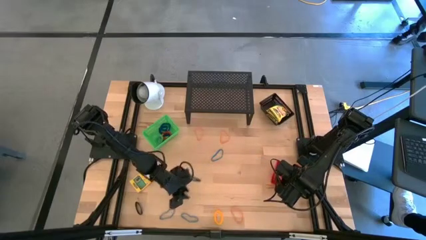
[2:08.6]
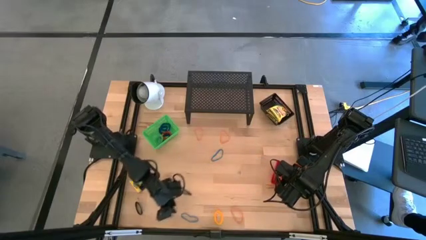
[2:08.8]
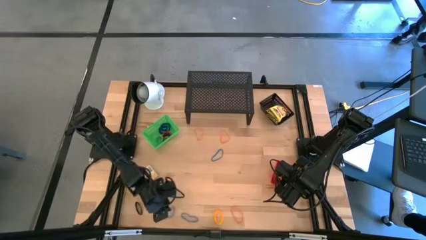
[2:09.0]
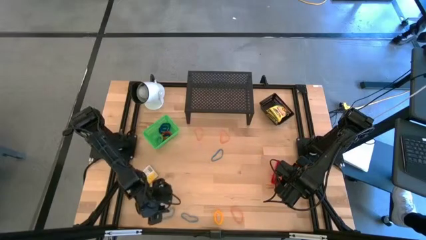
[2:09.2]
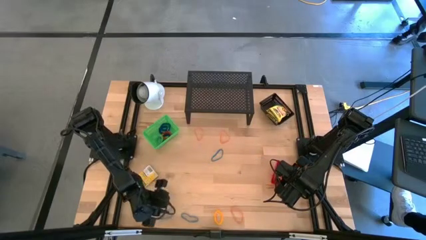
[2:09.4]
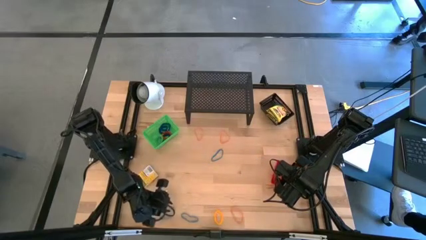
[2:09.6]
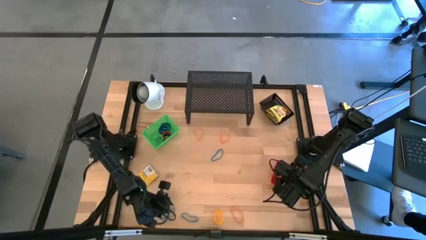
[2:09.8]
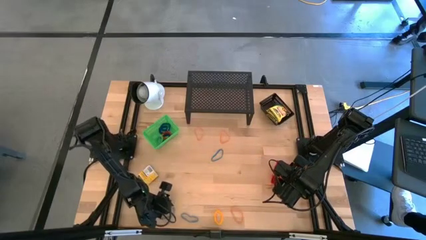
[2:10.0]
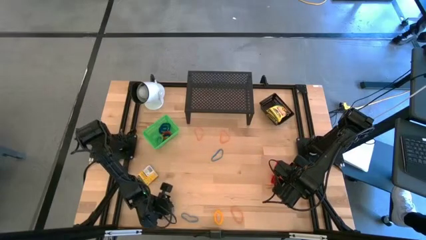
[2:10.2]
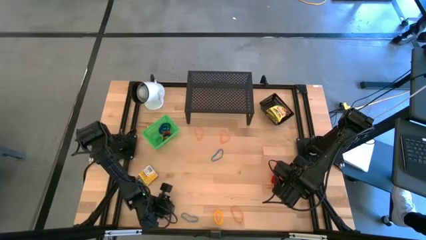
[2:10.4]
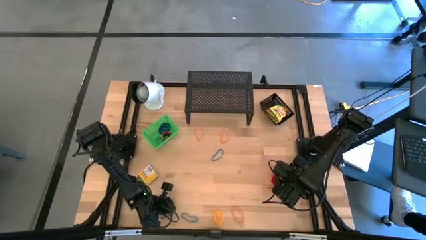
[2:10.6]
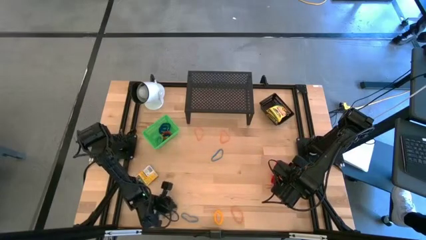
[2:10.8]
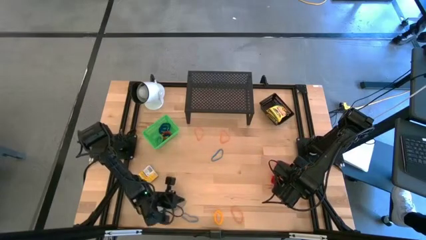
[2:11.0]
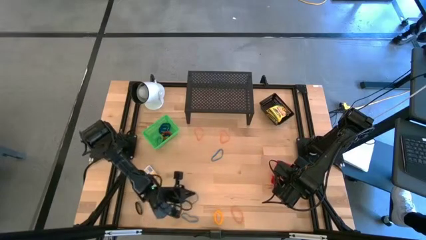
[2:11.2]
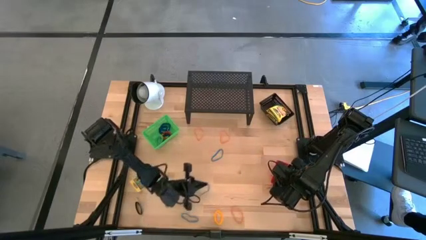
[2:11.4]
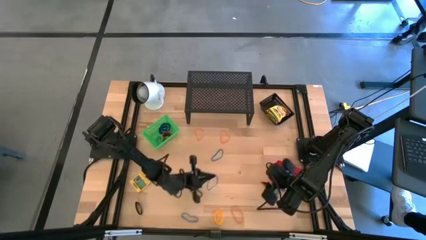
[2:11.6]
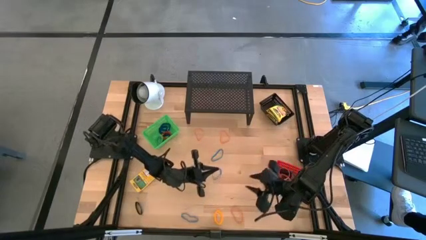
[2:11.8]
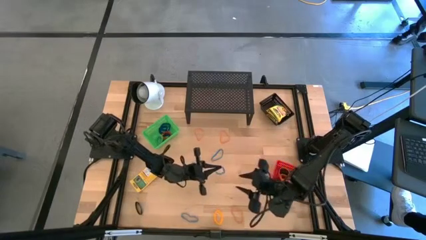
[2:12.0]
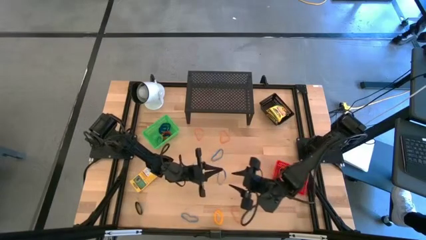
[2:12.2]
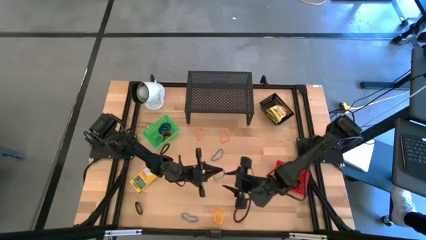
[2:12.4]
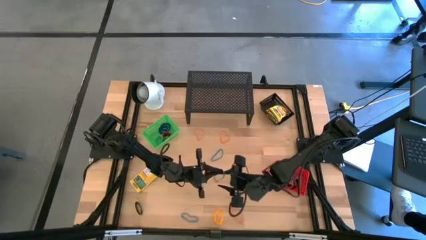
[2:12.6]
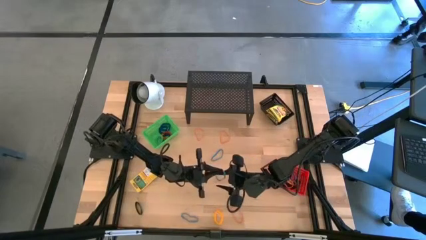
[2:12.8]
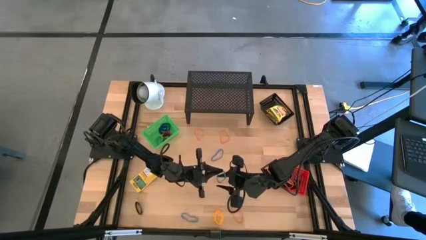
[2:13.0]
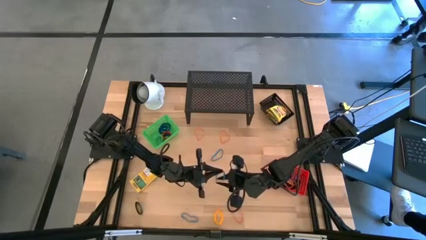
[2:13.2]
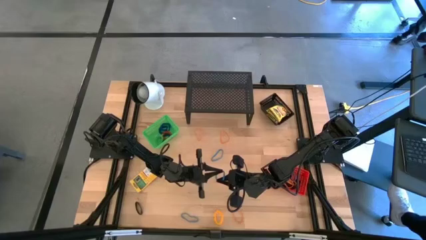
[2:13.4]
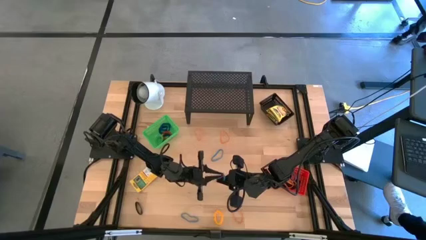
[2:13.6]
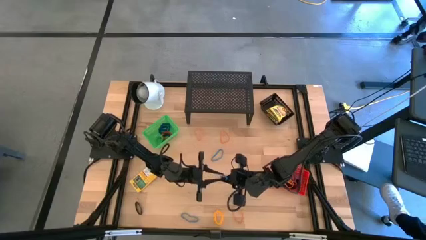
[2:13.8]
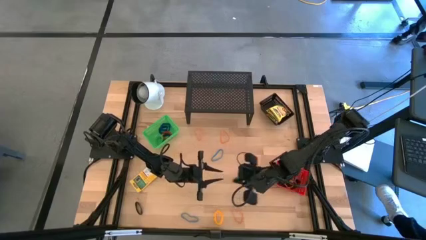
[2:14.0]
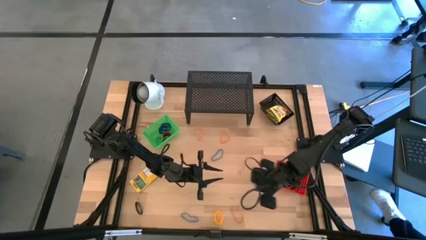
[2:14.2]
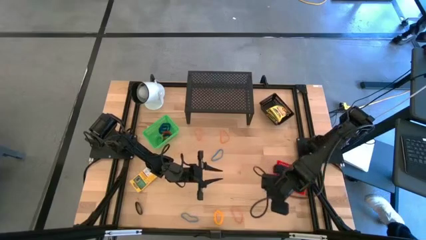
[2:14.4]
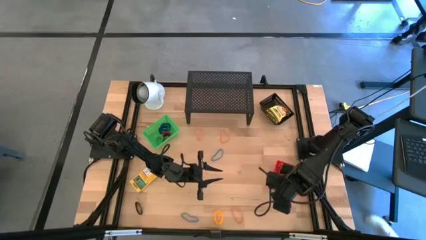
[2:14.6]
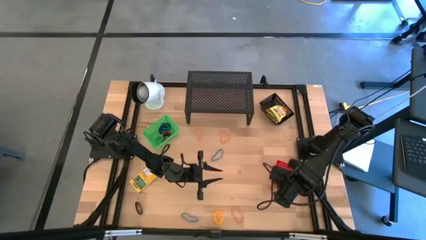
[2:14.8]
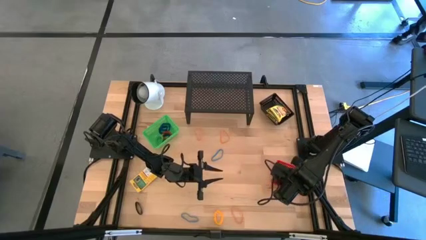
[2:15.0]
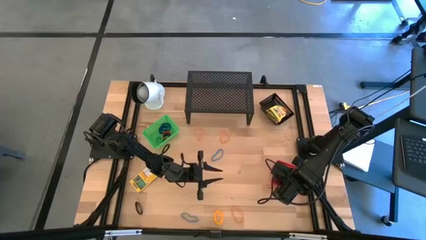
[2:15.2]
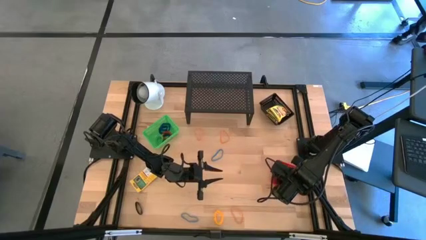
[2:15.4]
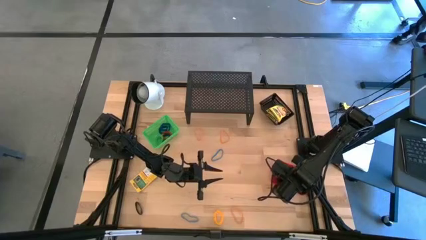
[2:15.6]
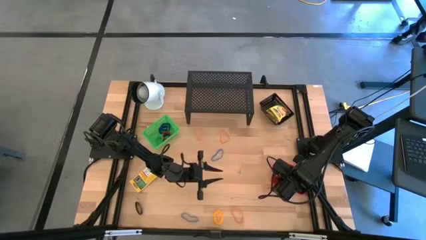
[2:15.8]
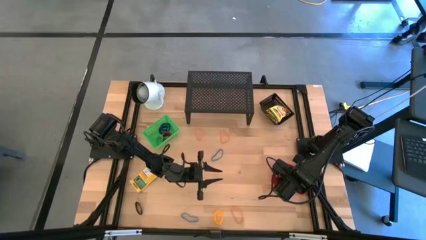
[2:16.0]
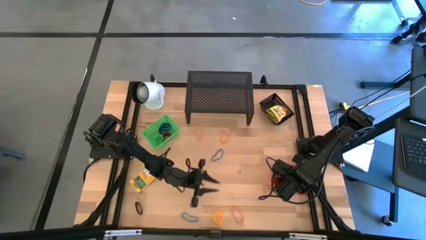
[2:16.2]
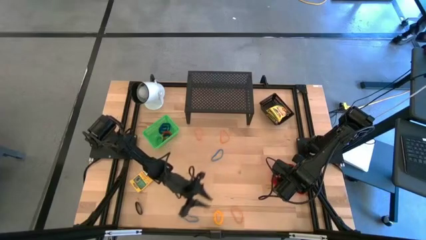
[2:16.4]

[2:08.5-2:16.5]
Task: Pick & Place Office Desk Supplies
Put the bottom left blue rubber band into the red bin

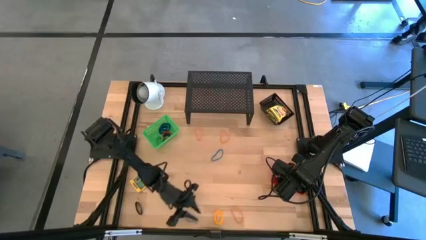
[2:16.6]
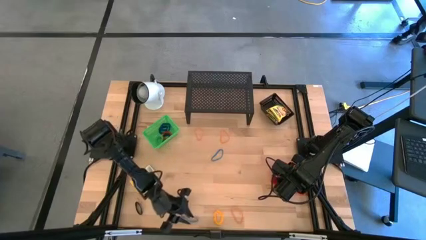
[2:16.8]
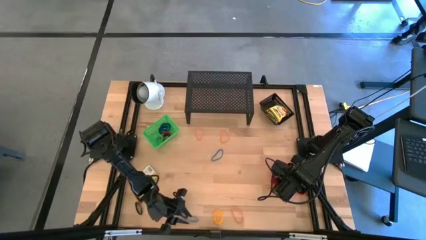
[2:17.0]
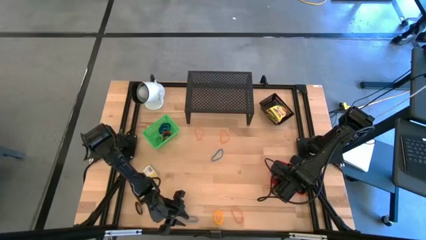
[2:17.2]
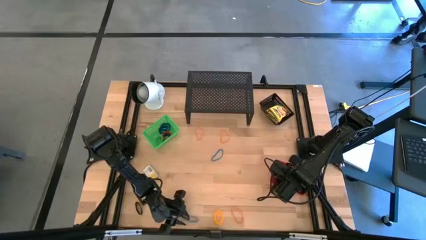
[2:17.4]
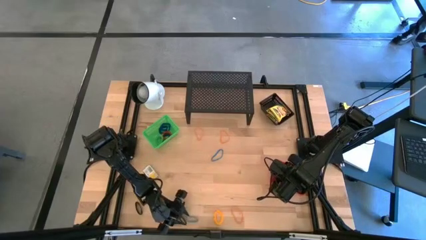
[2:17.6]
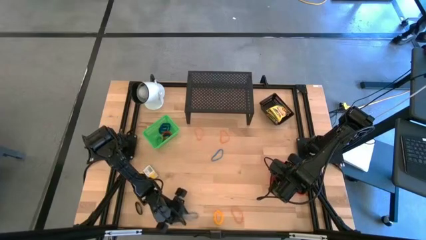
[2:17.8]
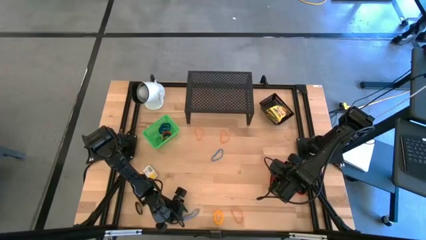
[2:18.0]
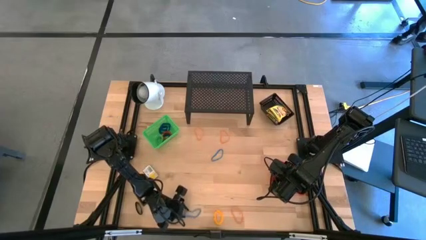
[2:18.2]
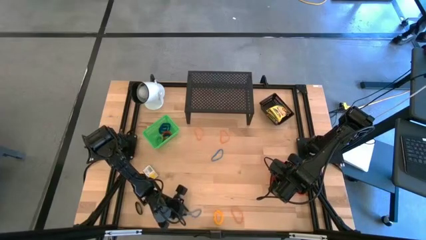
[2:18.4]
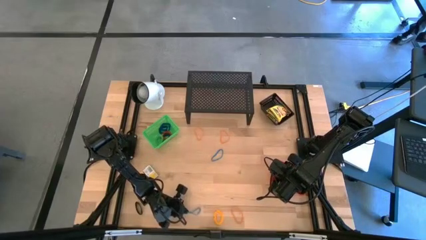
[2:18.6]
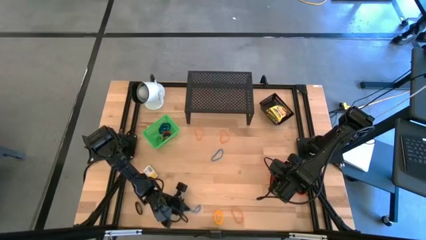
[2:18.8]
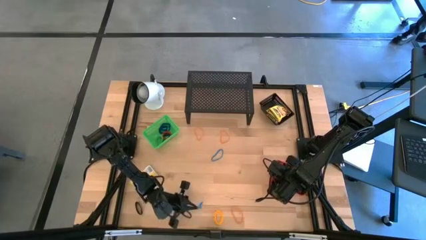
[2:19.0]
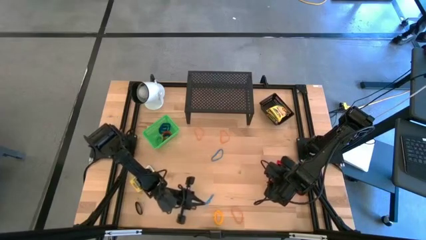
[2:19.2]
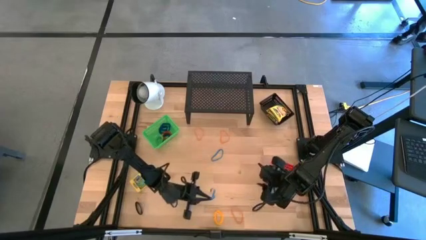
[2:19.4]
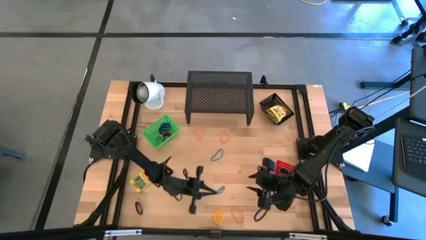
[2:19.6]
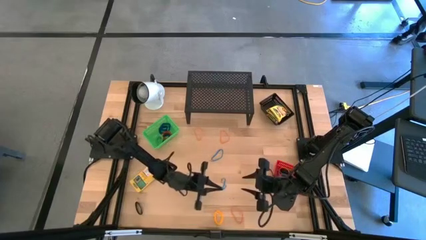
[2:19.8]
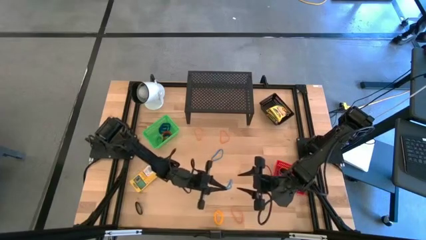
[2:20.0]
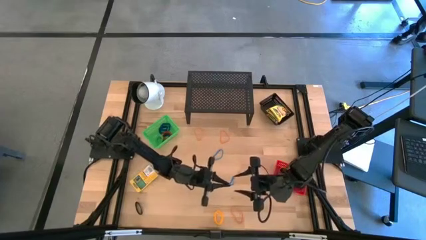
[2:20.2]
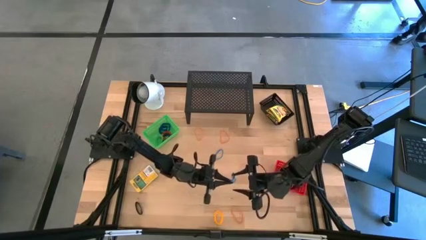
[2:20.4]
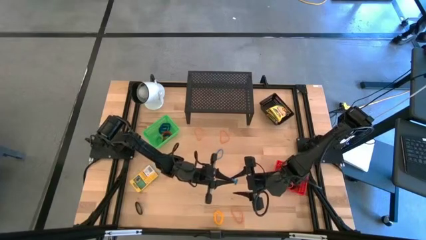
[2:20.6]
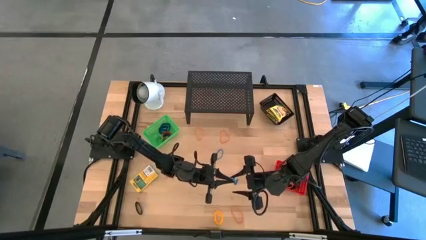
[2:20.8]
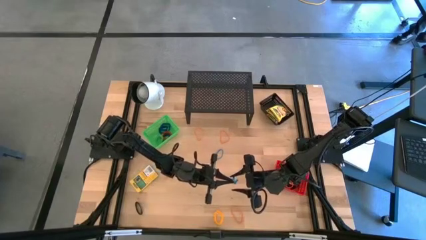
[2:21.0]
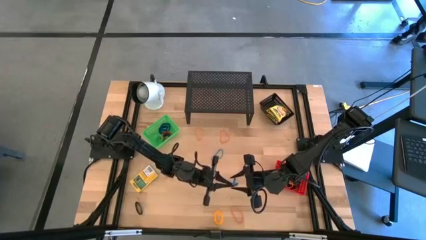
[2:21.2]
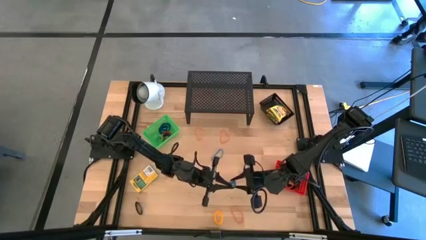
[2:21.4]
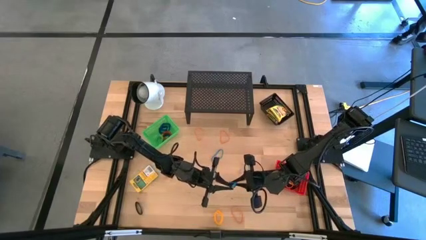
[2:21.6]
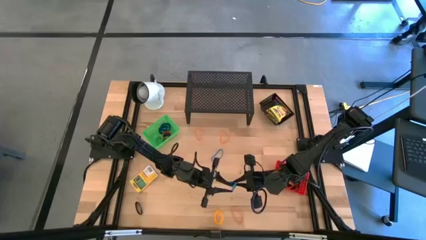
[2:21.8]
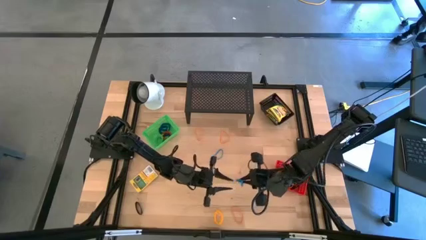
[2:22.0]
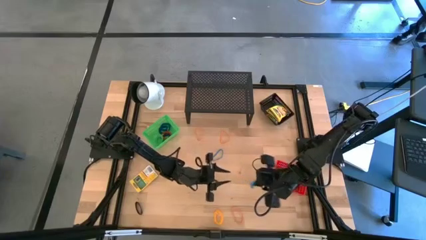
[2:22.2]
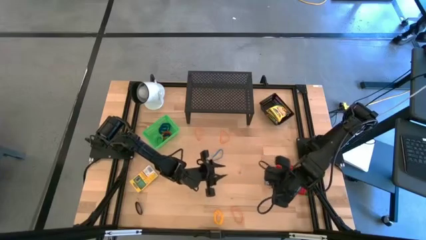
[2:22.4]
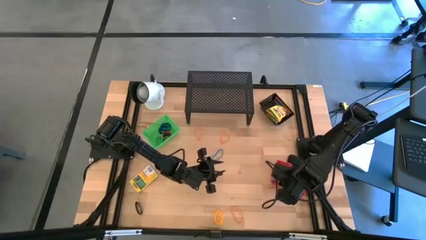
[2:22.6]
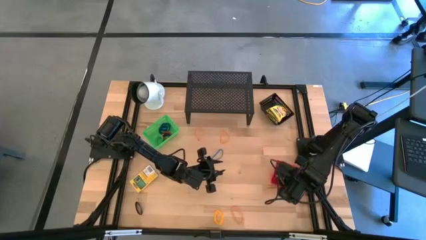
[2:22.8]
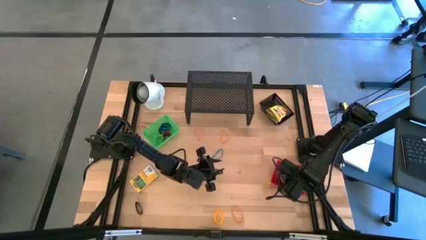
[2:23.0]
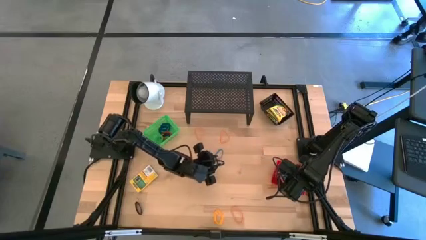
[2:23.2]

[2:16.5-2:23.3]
Put the bottom blue rubber band into the red bin

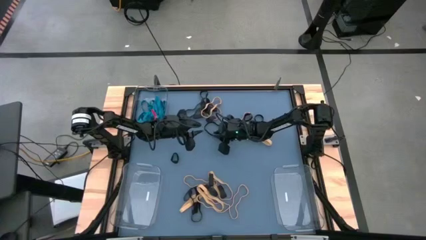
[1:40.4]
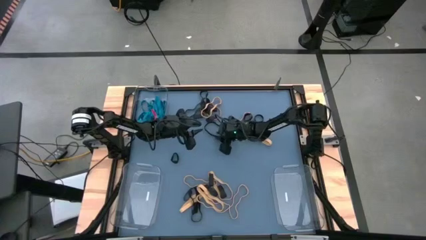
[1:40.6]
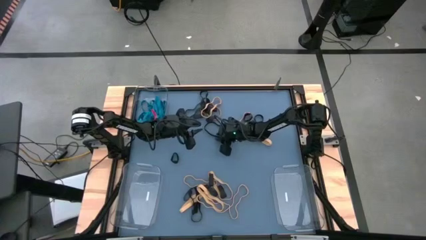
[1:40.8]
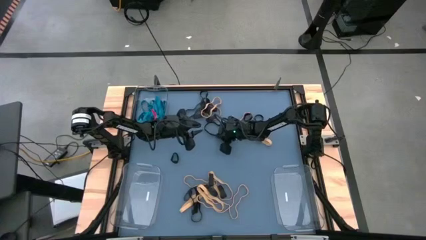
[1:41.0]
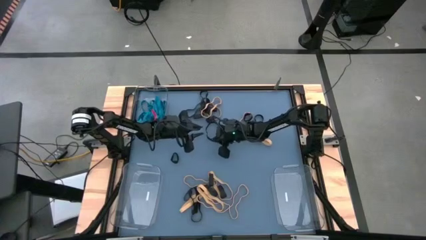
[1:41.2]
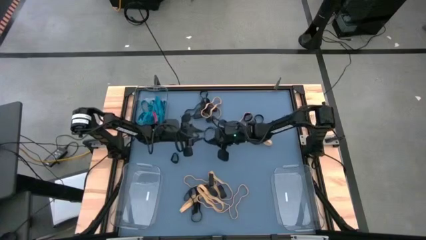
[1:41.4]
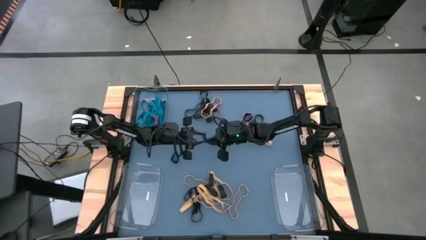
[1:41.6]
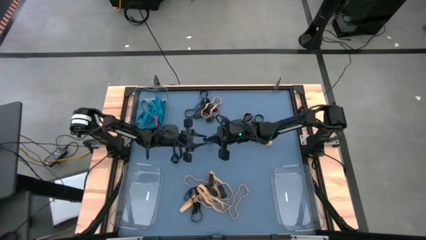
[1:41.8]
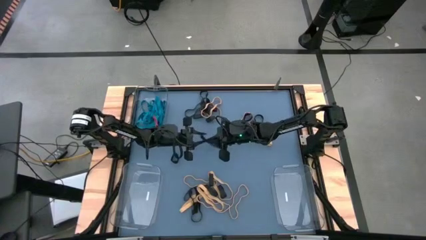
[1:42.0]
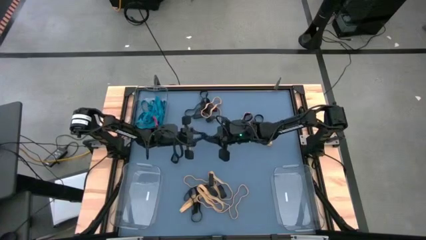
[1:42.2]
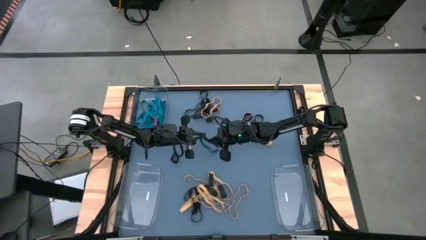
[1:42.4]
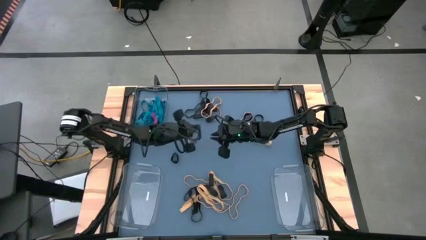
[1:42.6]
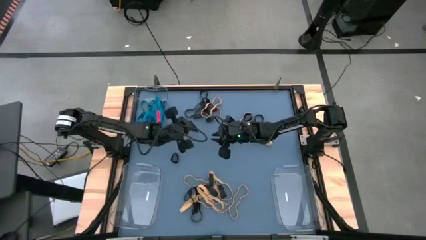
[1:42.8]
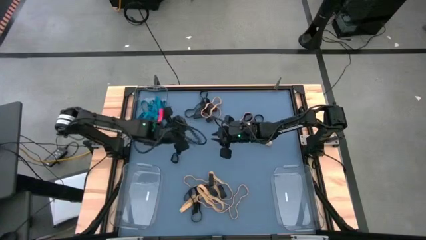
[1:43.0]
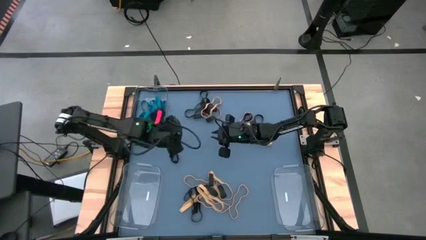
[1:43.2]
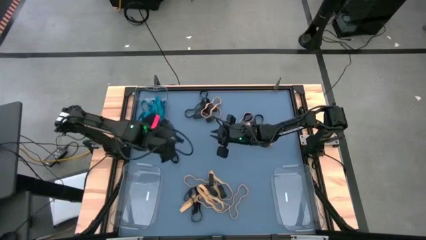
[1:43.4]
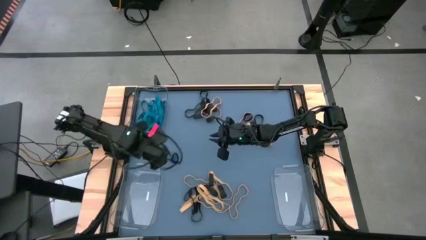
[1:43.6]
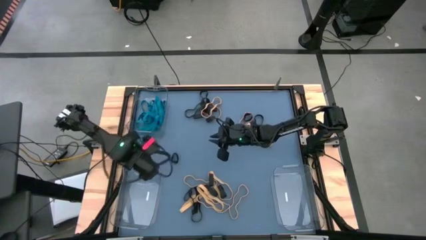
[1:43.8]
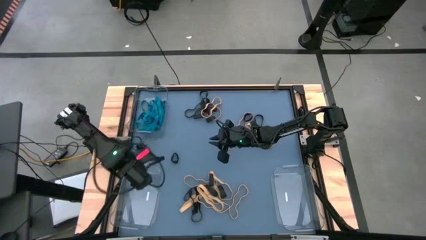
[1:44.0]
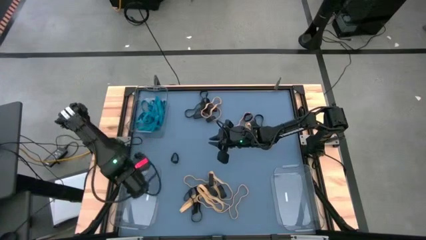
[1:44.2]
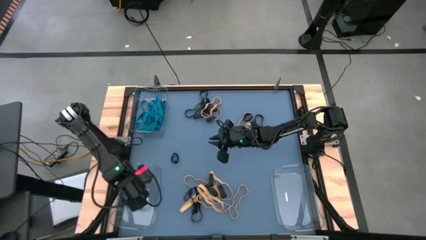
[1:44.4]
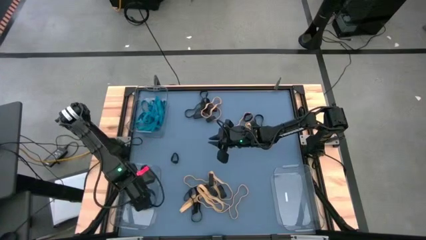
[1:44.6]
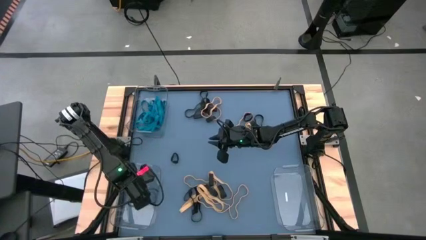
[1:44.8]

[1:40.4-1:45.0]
Task: Sort rubber bands into baskets
Put the black rubber band into the bottom left transparent bin
